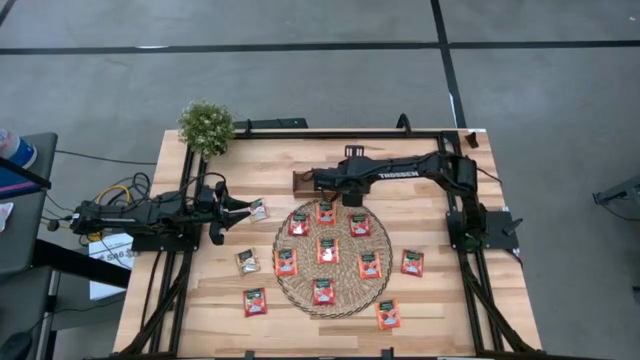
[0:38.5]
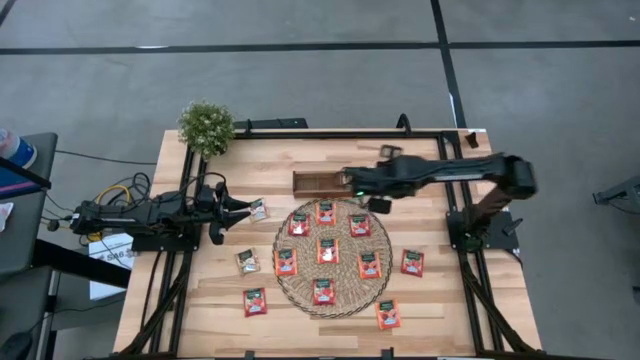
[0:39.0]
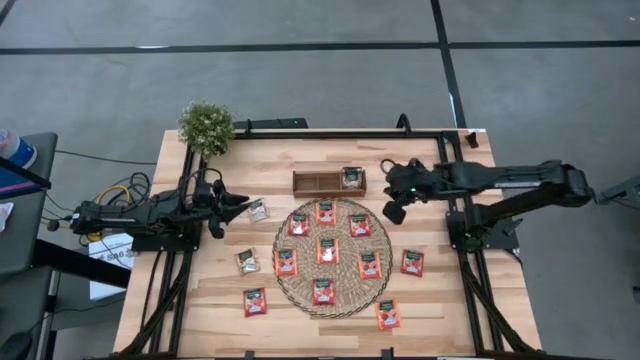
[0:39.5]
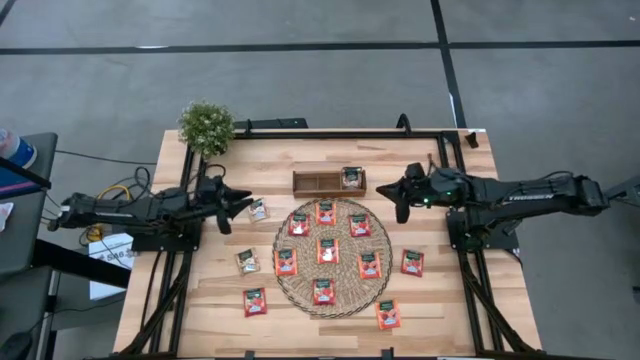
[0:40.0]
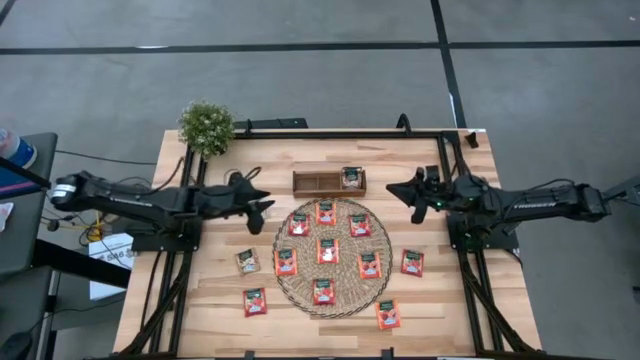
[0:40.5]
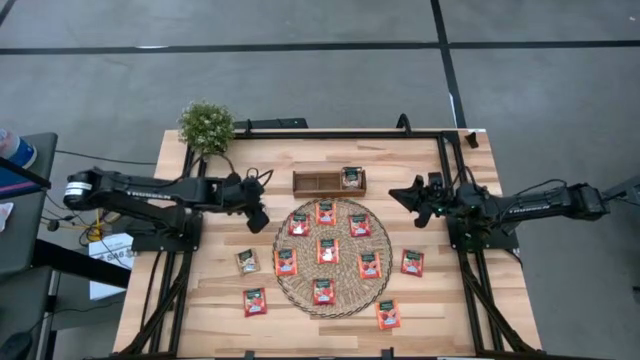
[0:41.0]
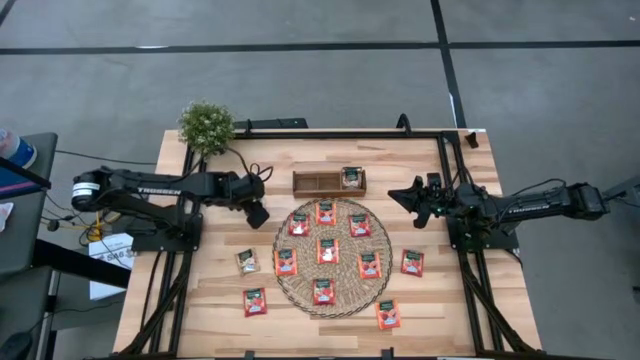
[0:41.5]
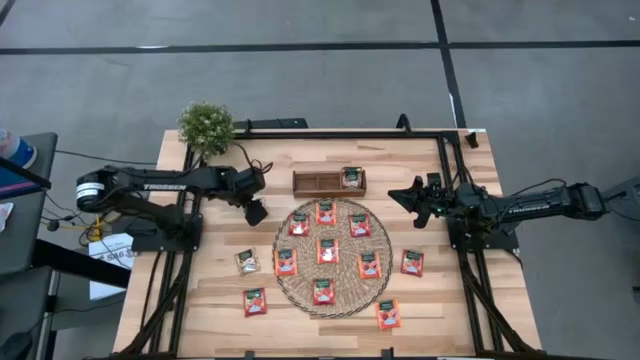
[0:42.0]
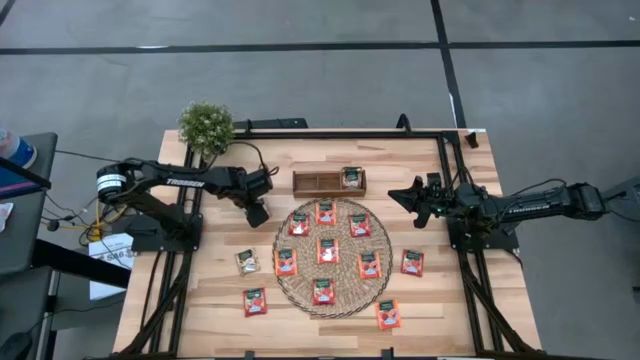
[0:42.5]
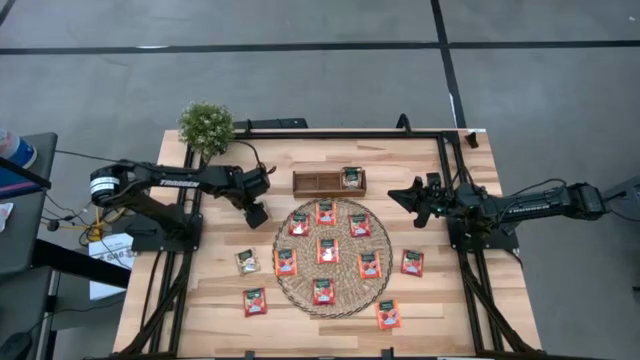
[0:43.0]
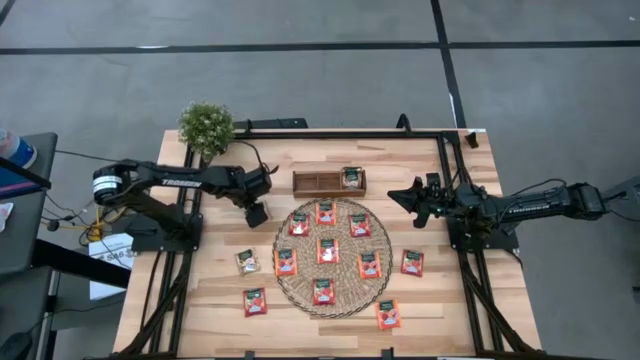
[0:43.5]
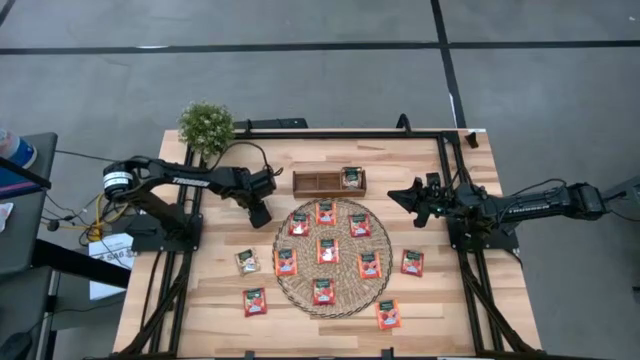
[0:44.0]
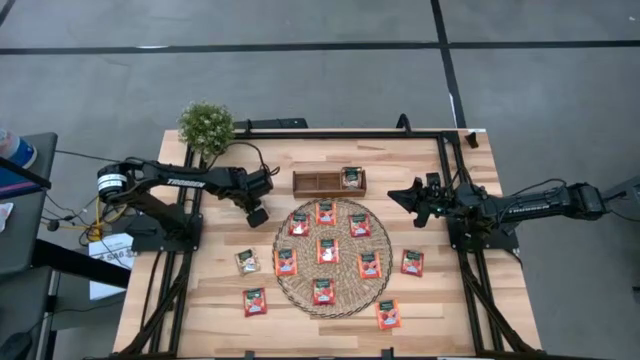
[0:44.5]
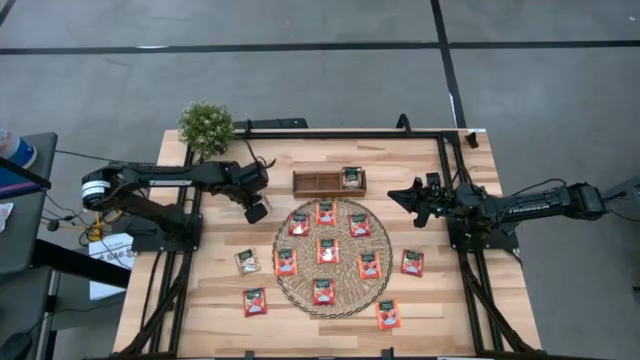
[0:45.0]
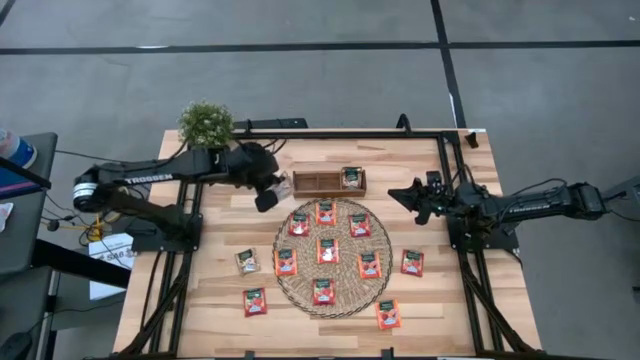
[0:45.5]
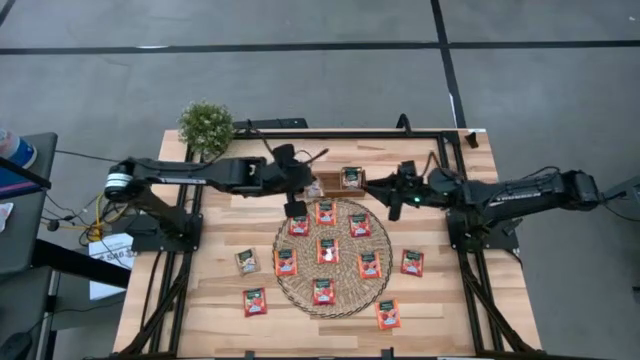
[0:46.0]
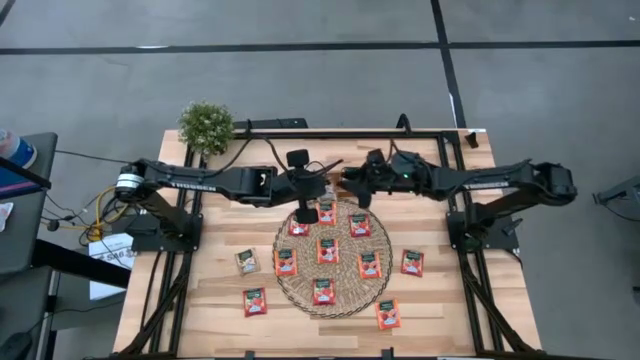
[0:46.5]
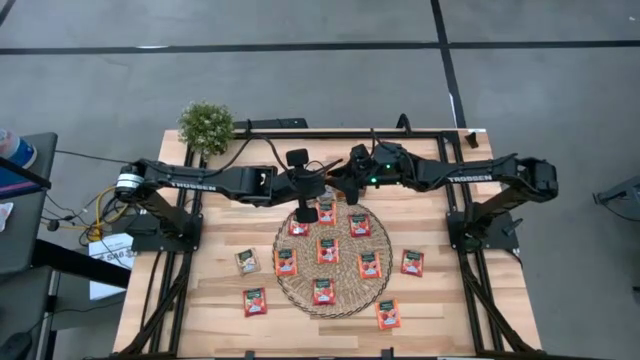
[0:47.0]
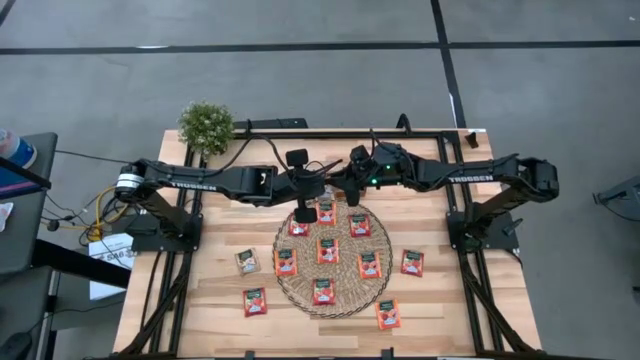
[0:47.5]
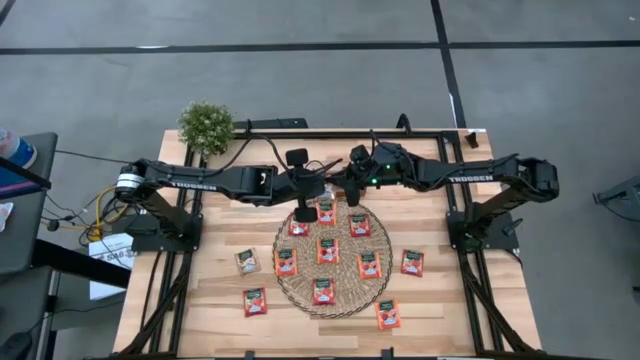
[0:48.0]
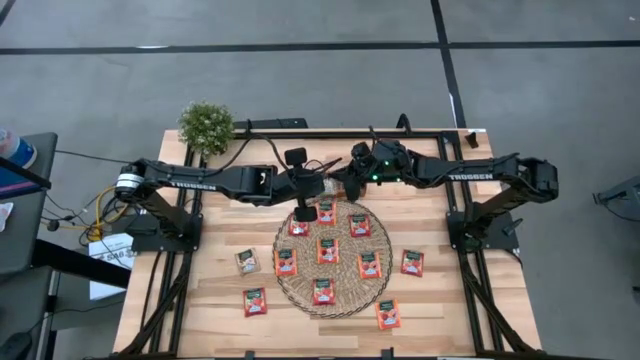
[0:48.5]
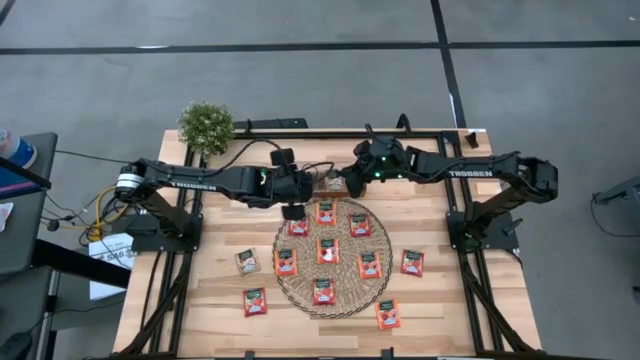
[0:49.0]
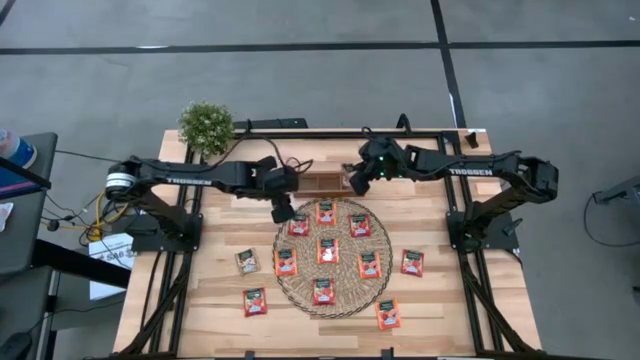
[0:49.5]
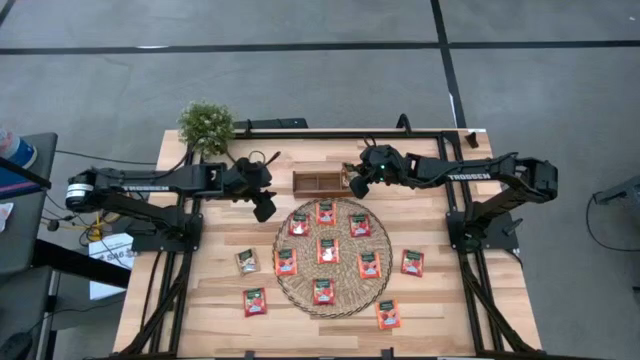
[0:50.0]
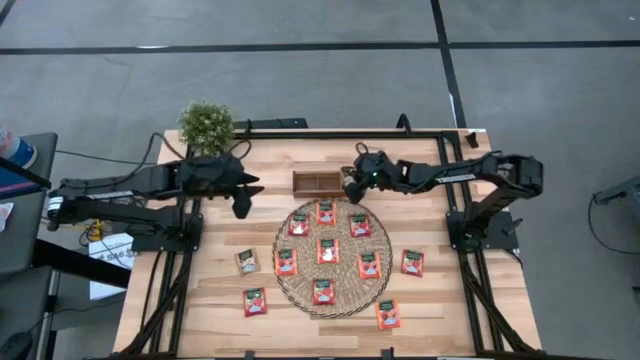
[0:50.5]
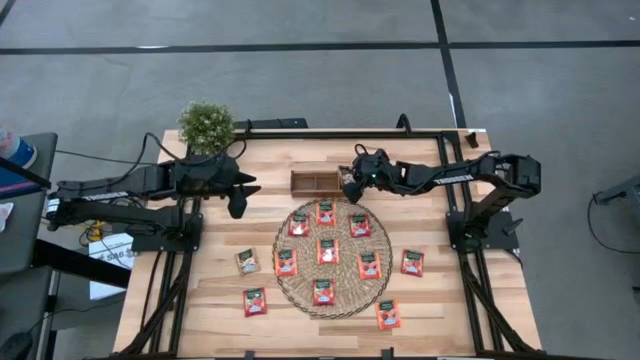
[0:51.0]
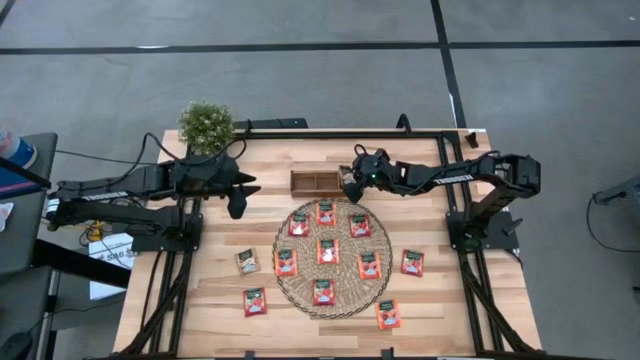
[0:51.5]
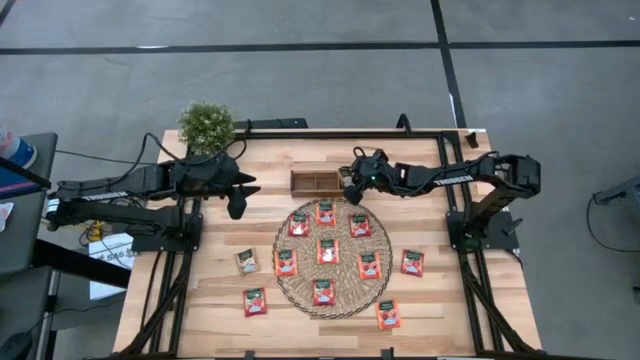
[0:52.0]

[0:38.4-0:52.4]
Task: Pick & Place Tea
Put the brown tea bag into the right section of the wooden organizer

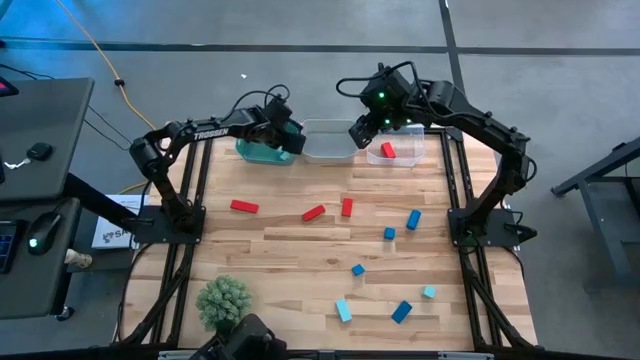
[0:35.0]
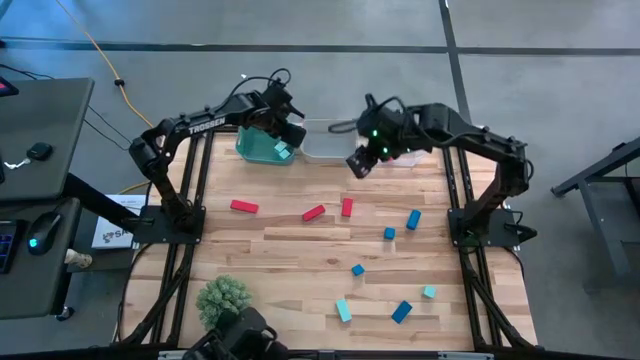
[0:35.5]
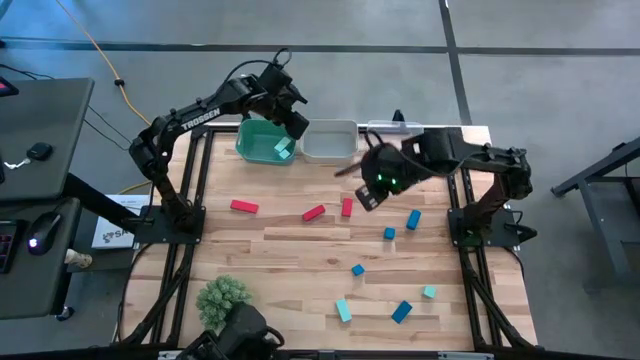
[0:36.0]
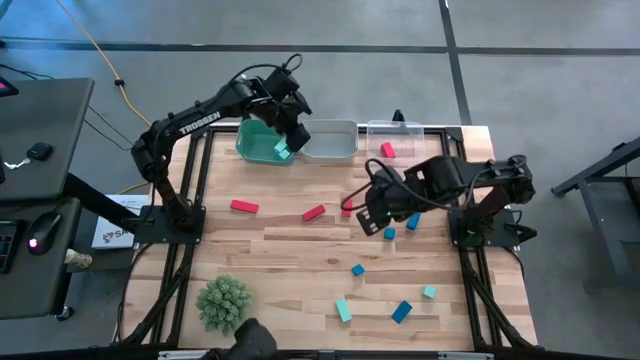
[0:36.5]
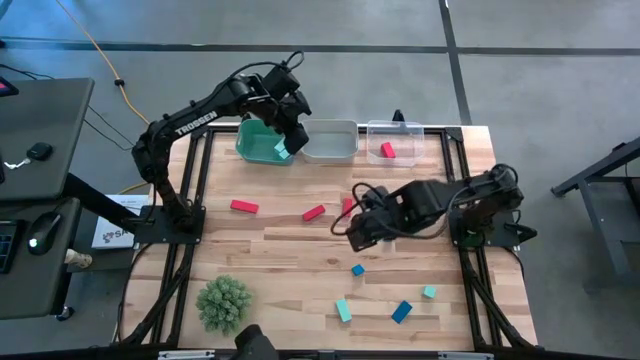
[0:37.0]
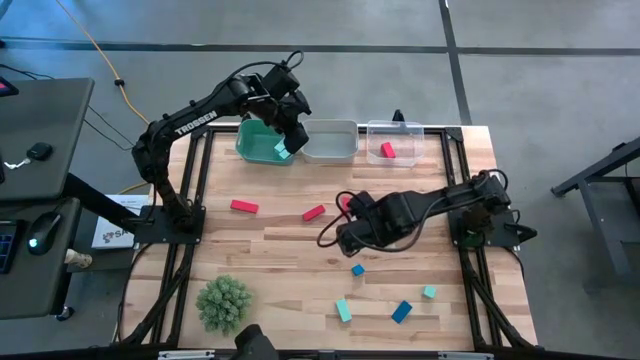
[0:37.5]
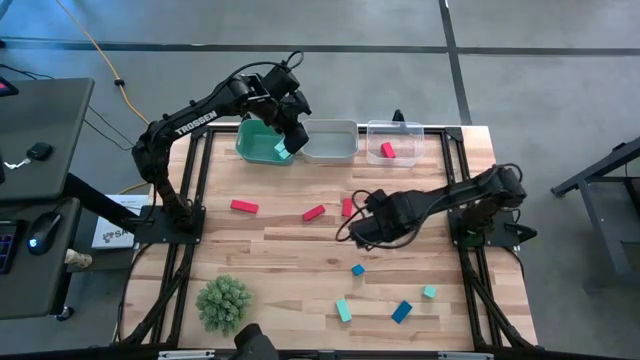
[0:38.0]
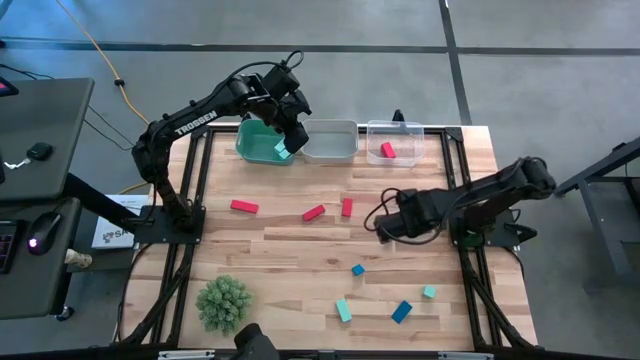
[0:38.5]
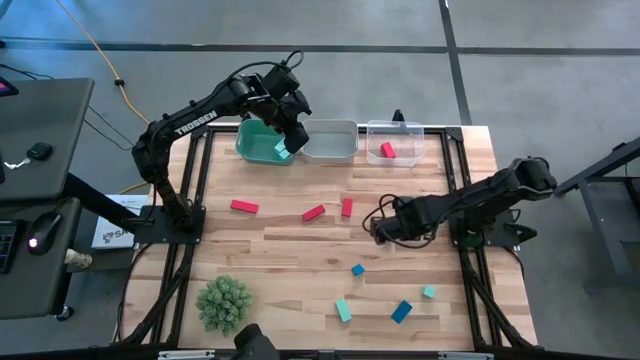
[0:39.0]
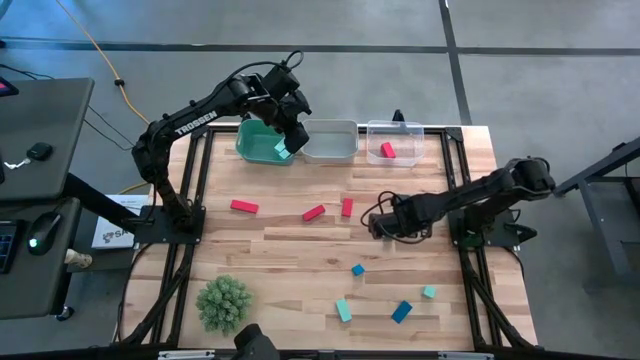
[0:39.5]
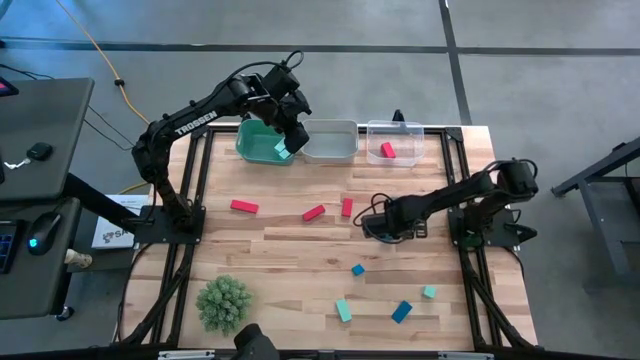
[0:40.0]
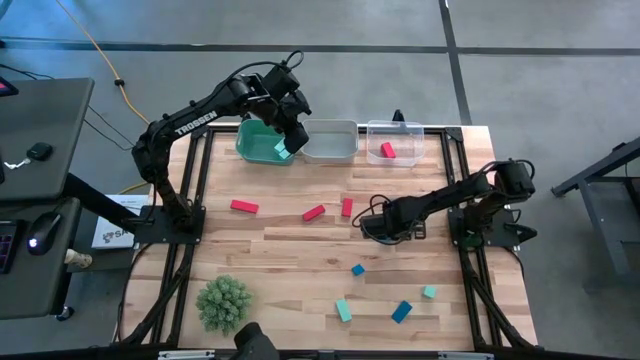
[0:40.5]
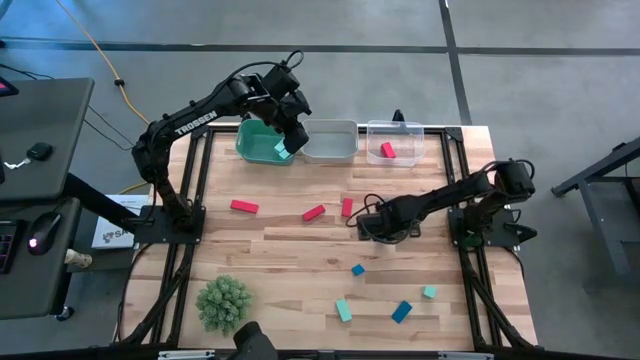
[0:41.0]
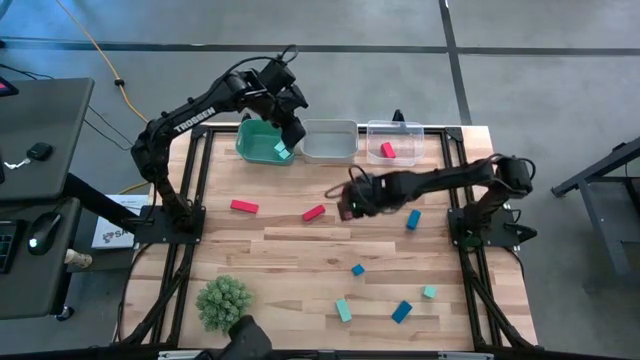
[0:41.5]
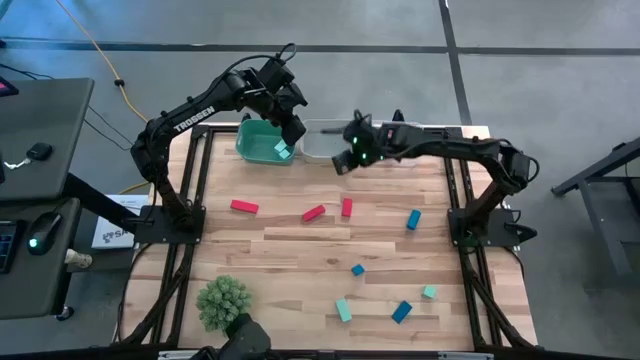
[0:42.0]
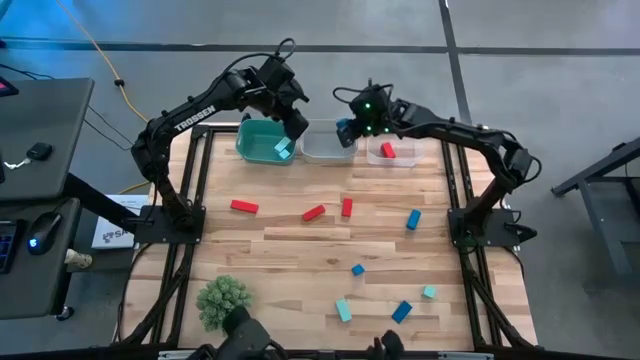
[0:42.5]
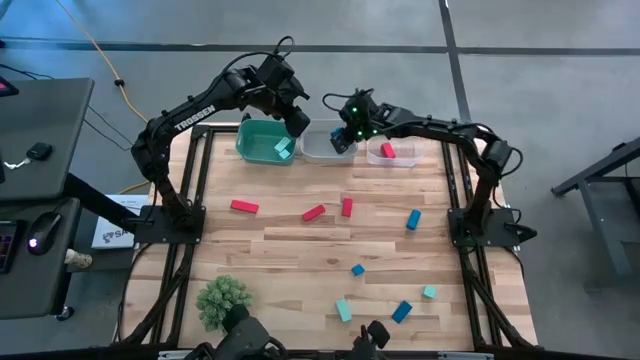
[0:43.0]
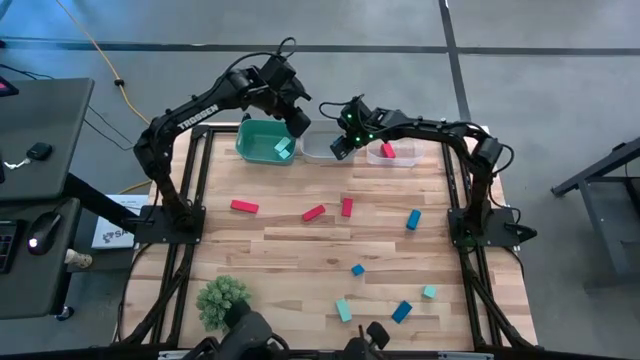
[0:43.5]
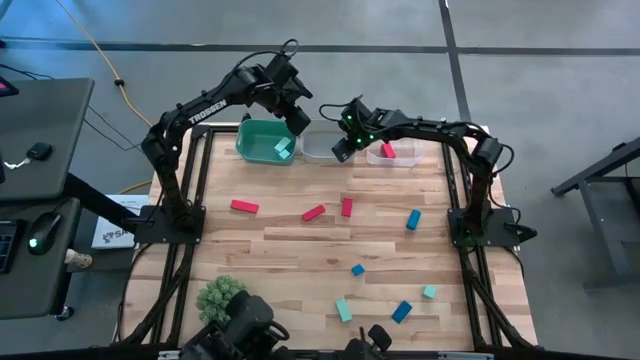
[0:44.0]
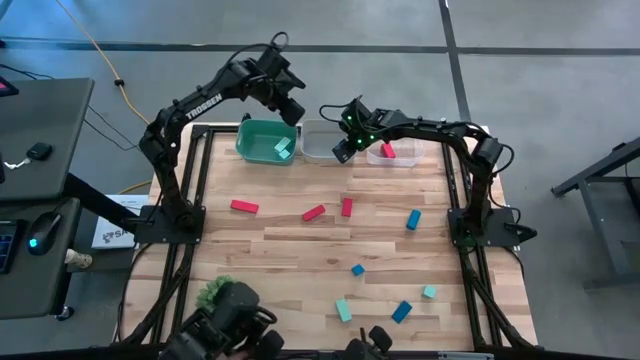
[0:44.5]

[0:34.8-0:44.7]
Task: Sort & place blocks by color
Put the blue block into the gray bin
